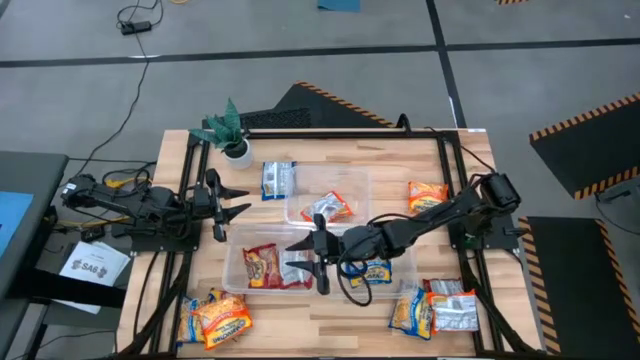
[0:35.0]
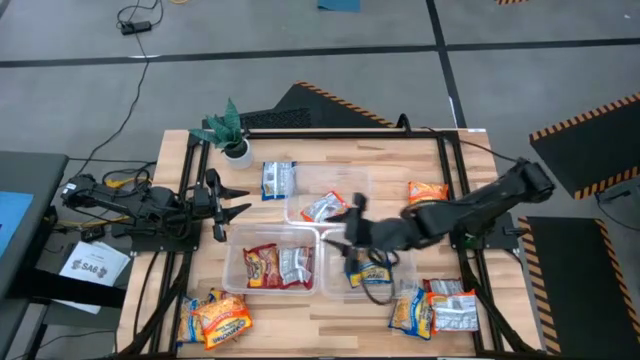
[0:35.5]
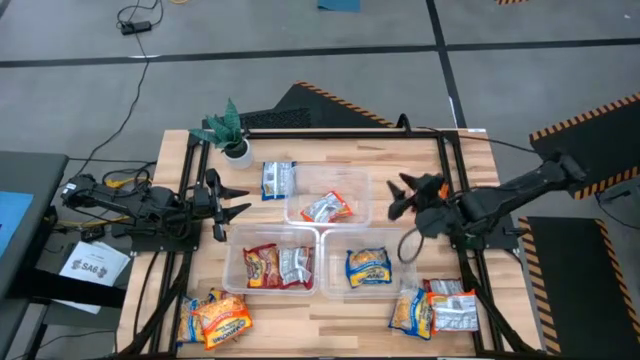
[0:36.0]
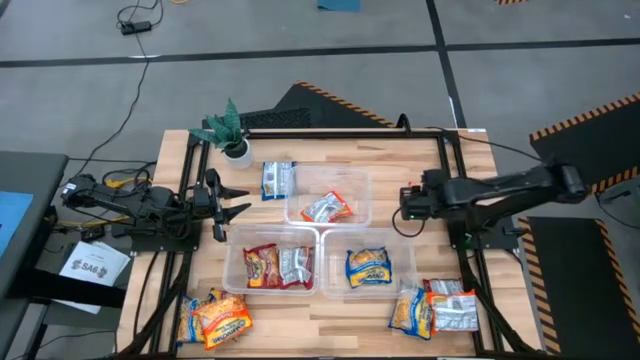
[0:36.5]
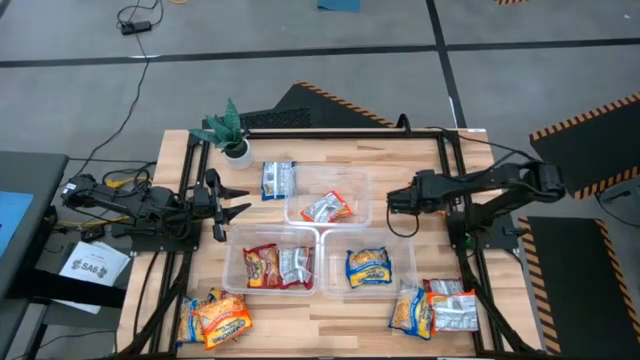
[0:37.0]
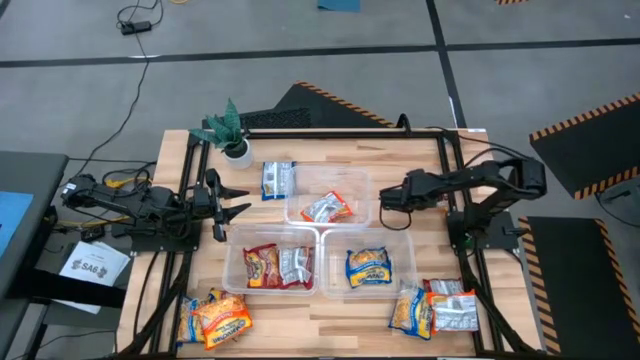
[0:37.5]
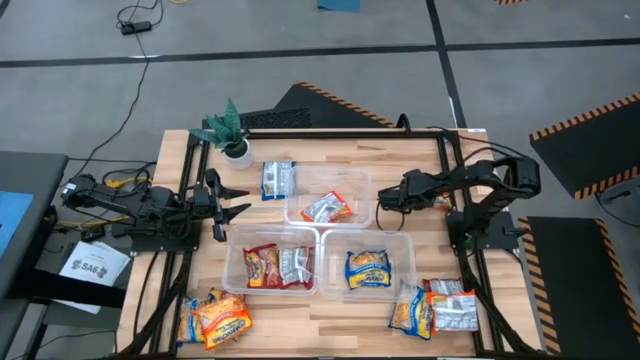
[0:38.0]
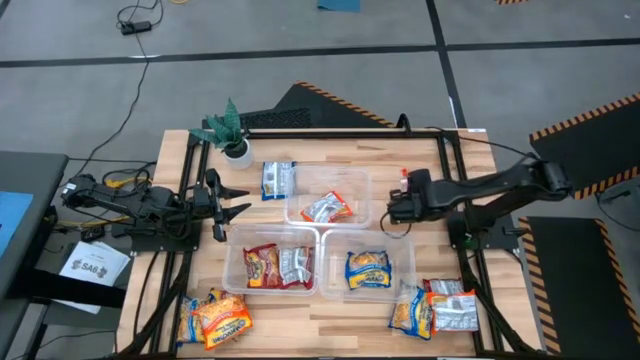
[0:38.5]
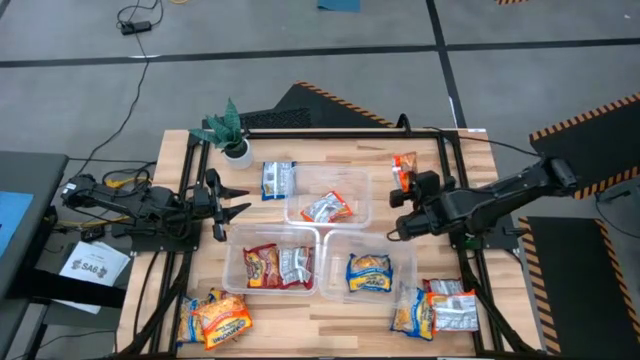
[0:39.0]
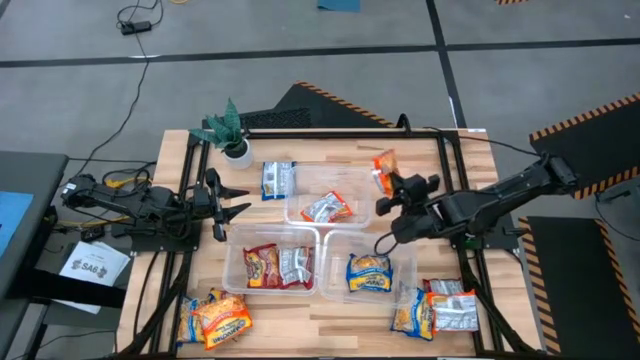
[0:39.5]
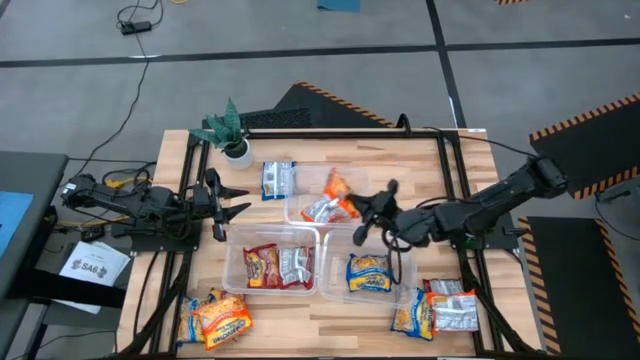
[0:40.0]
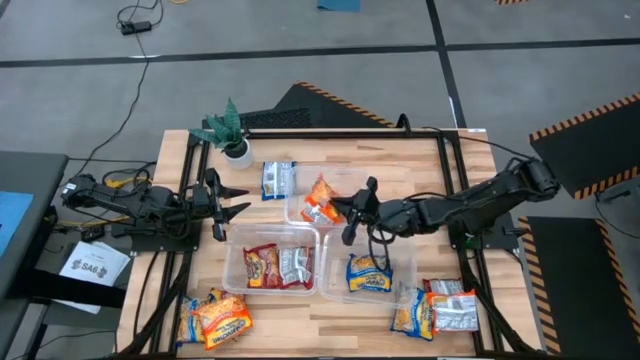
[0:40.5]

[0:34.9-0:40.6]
Task: Sort Maruchan noodles
Put the orange noodle pack into the top transparent bin

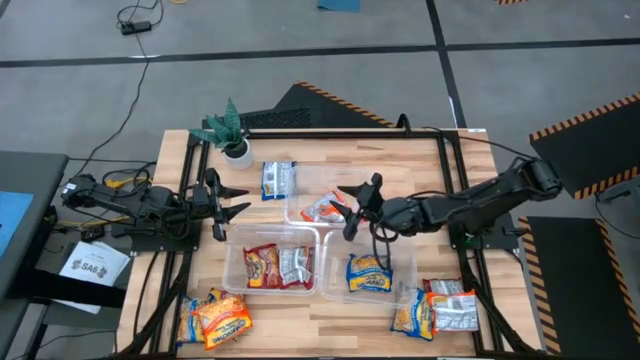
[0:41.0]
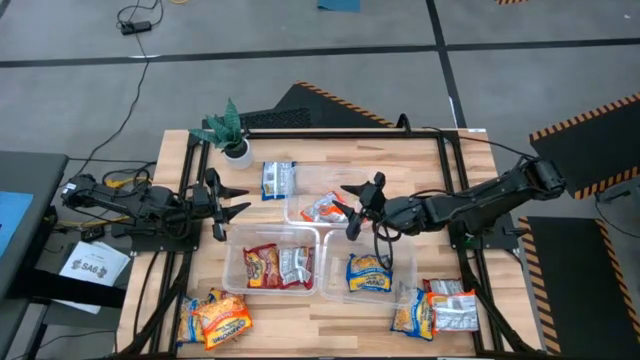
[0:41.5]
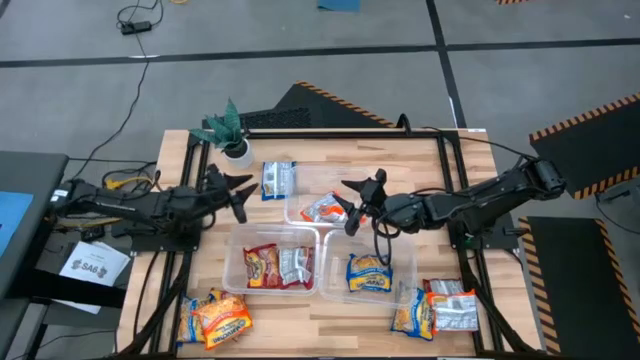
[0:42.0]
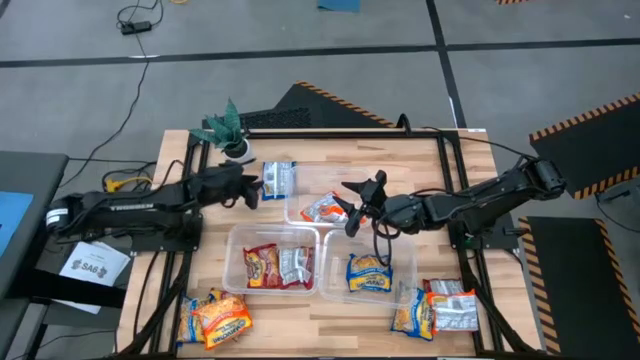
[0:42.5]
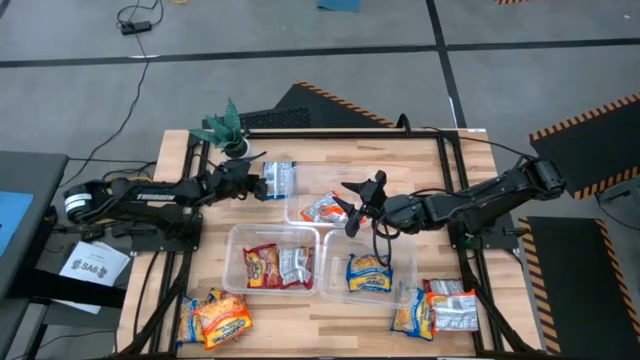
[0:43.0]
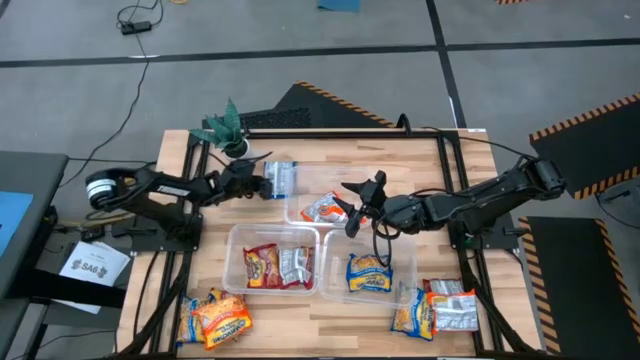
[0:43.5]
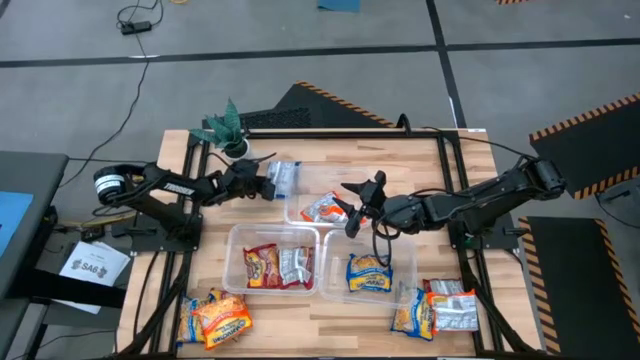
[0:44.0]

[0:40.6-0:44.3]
Put the blue noodle pack into the bottom right transparent bin

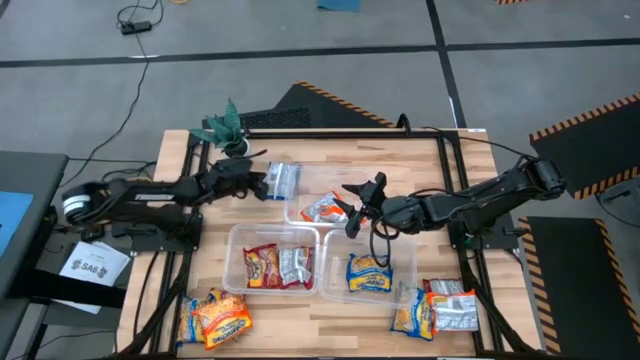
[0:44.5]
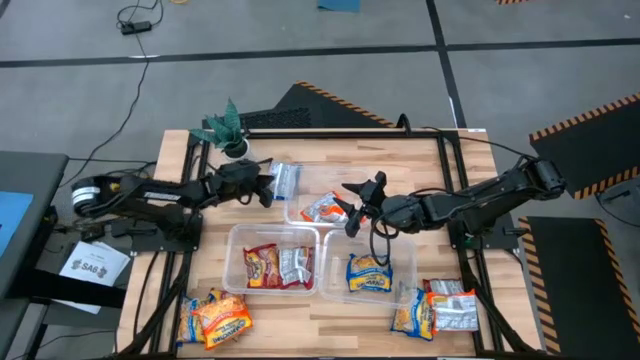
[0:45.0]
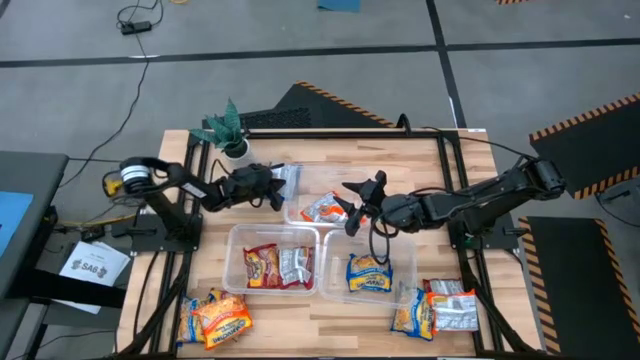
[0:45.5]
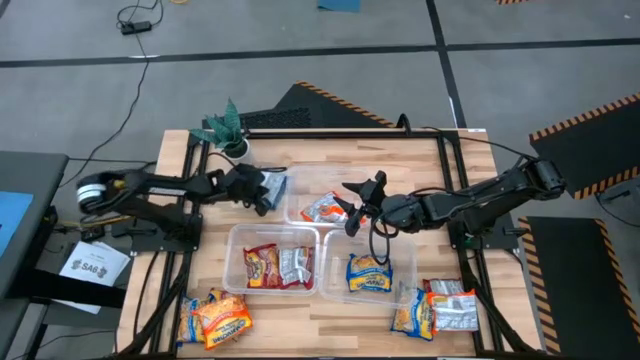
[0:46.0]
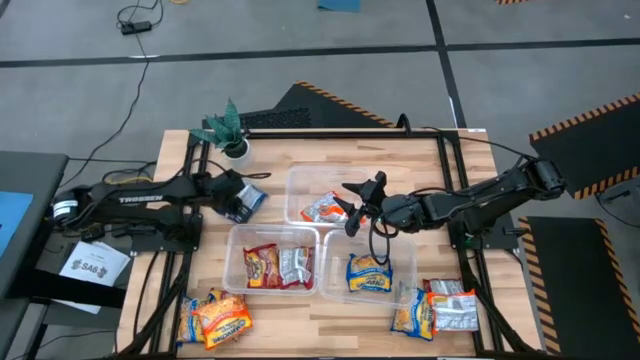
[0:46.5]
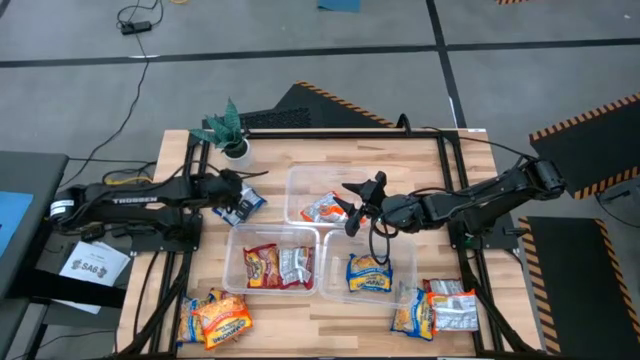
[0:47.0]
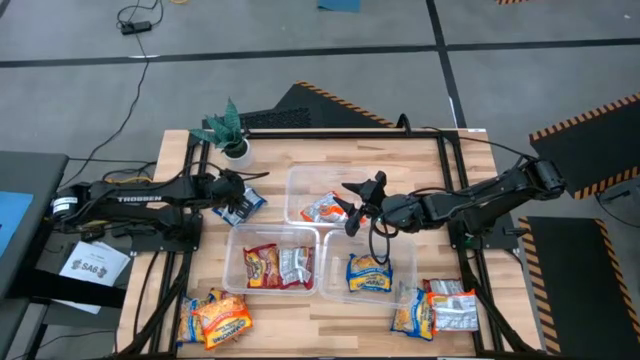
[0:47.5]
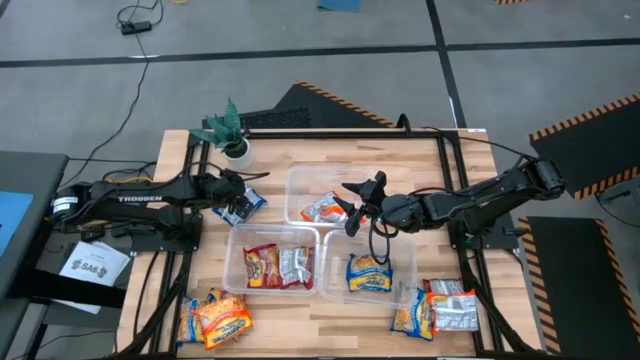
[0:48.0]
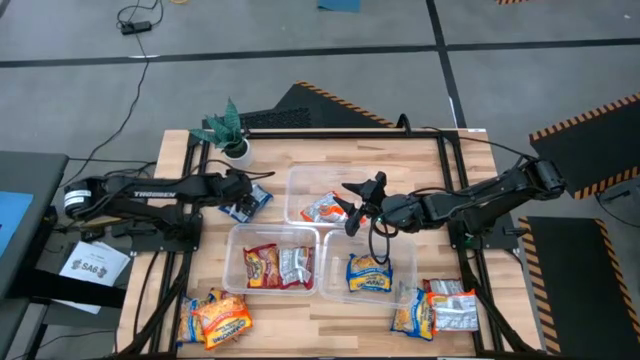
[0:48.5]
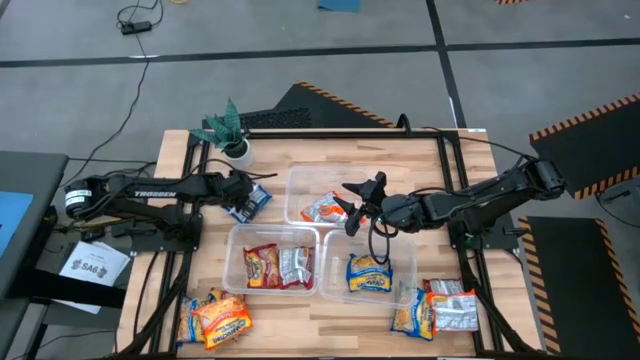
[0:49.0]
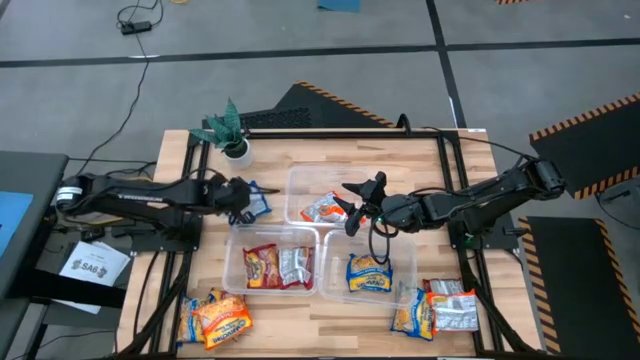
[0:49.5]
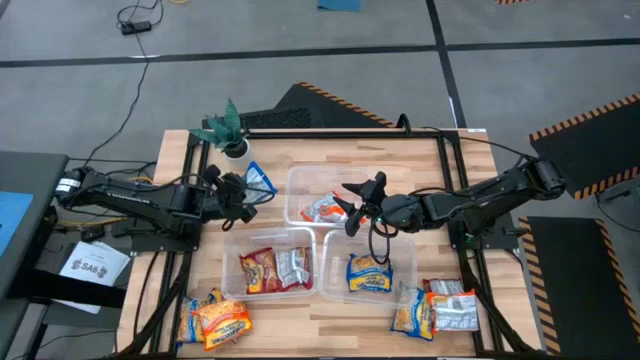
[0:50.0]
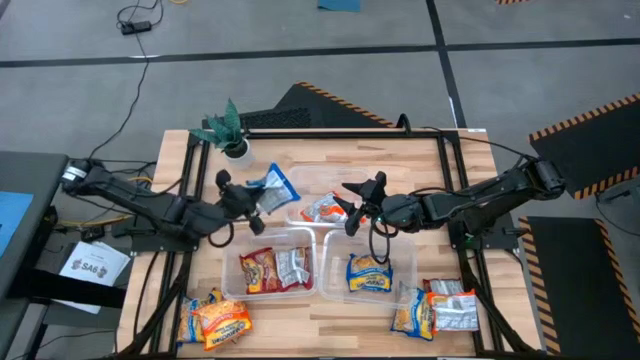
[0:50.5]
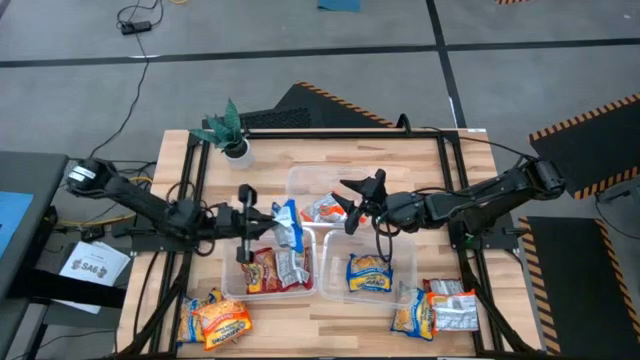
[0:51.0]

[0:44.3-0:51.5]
Put the blue noodle pack into the bottom right transparent bin

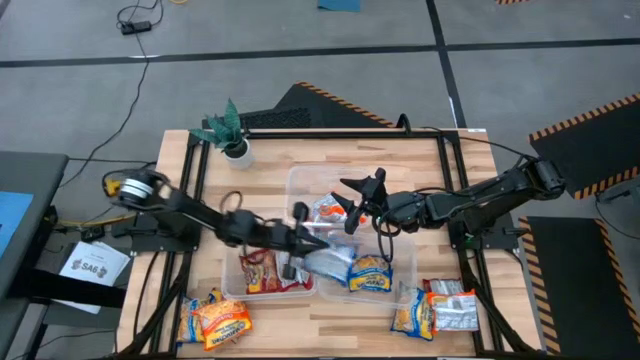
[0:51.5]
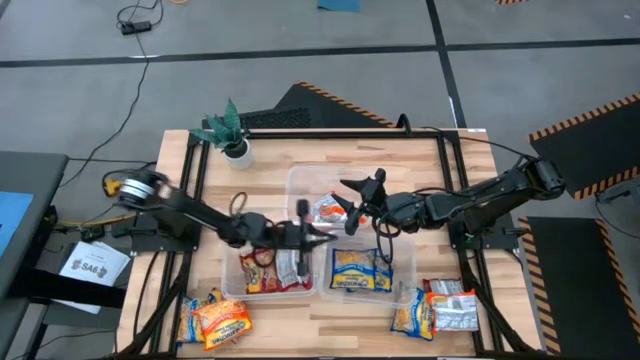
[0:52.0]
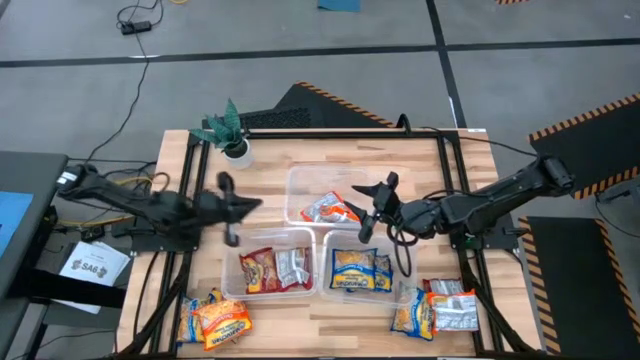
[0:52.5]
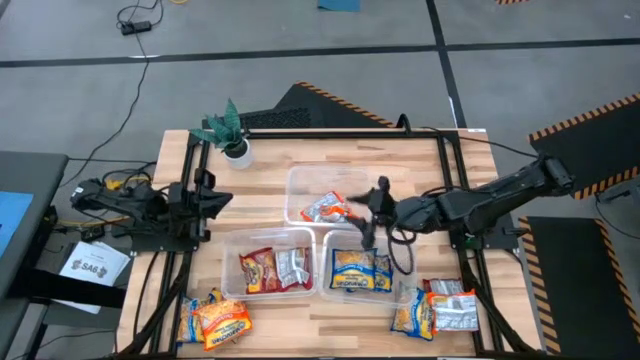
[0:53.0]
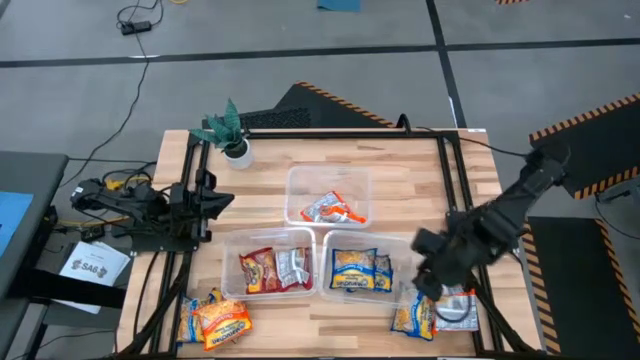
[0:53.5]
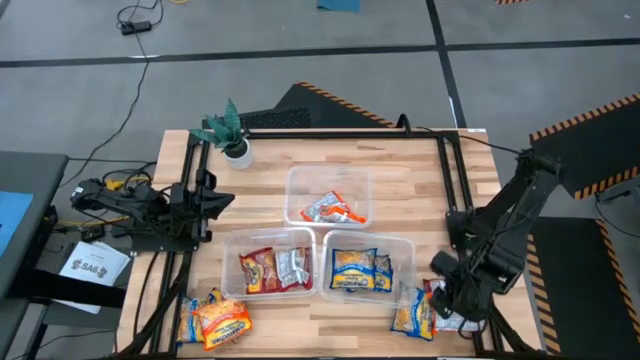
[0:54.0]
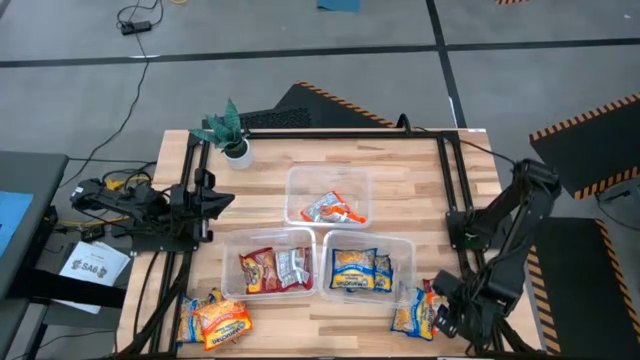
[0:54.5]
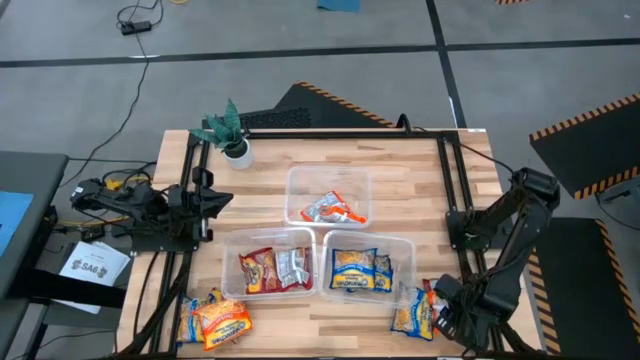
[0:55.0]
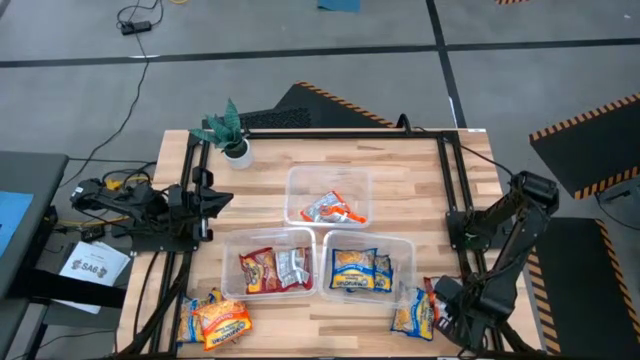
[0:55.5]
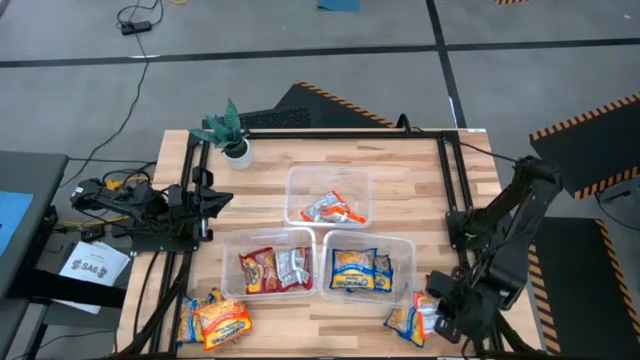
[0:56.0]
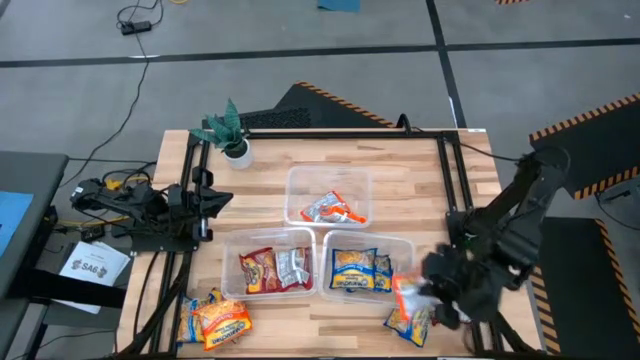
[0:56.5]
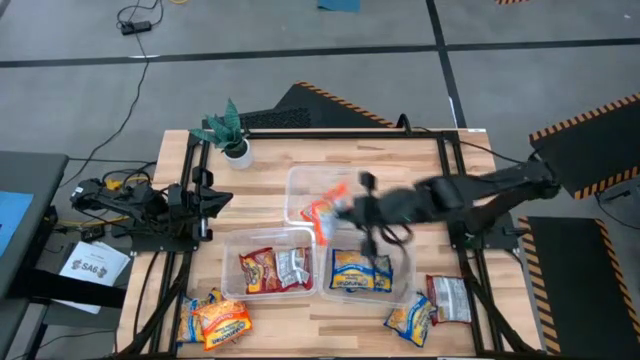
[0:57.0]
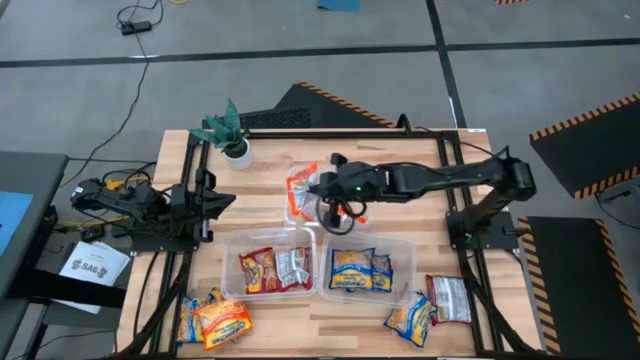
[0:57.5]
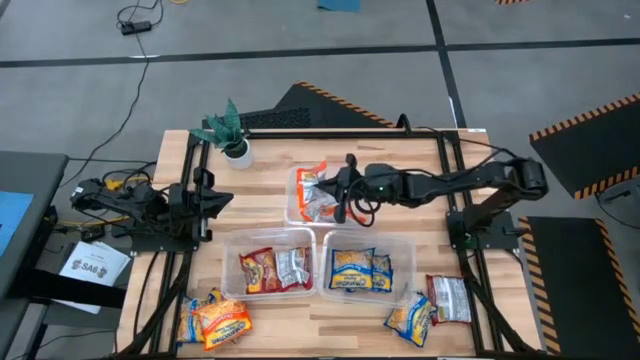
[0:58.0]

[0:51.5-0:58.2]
Put the orange noodle pack into the top transparent bin
